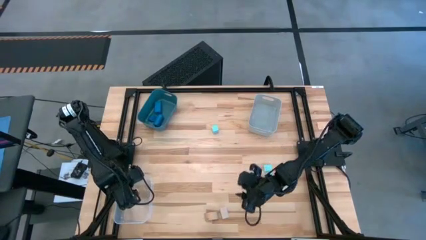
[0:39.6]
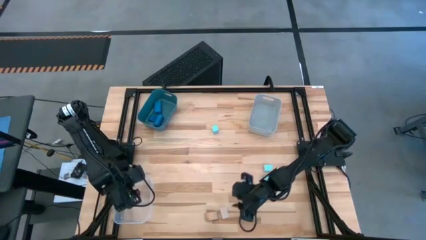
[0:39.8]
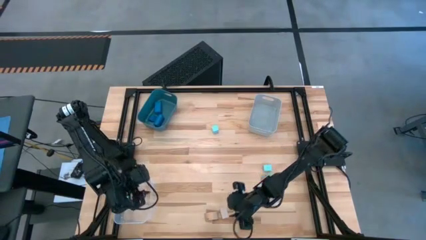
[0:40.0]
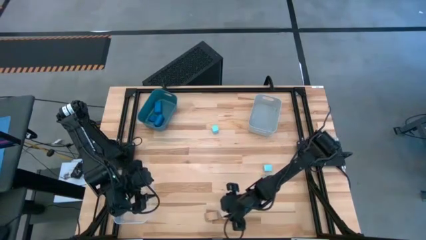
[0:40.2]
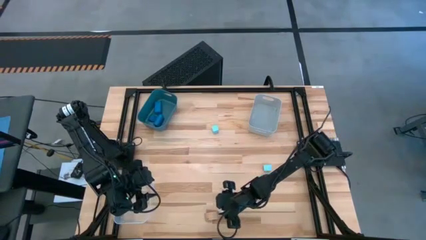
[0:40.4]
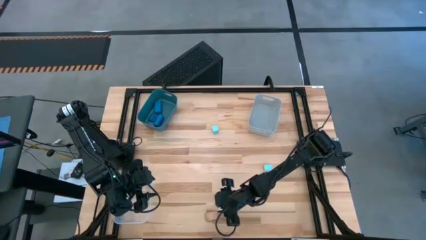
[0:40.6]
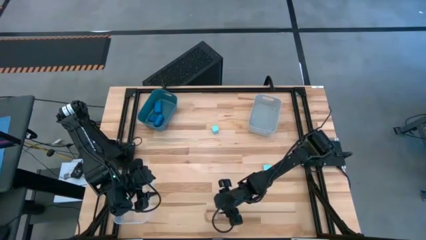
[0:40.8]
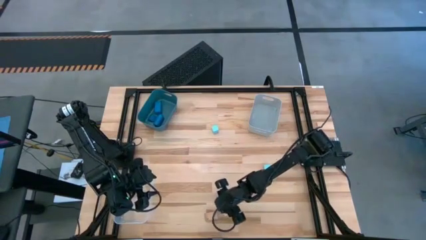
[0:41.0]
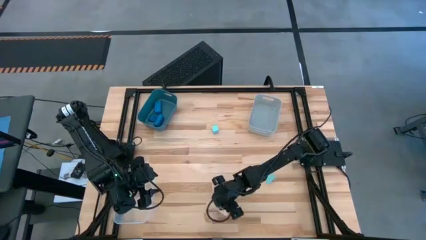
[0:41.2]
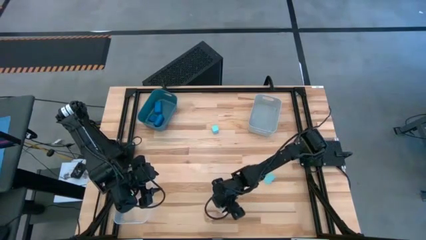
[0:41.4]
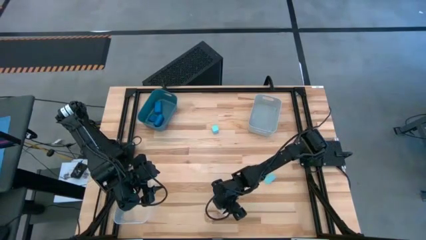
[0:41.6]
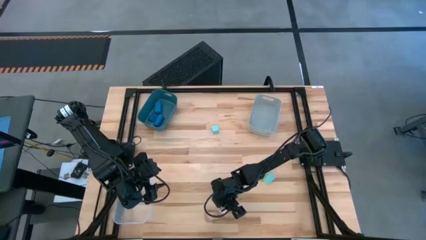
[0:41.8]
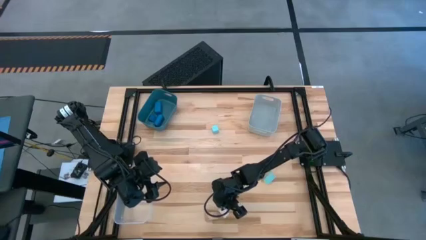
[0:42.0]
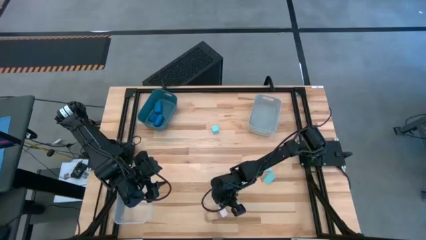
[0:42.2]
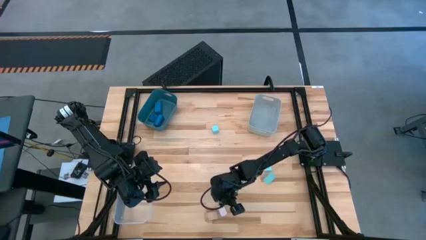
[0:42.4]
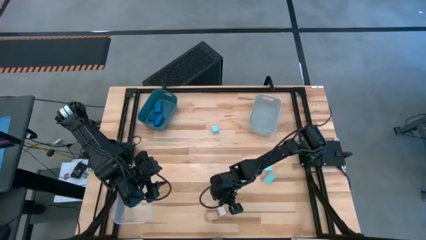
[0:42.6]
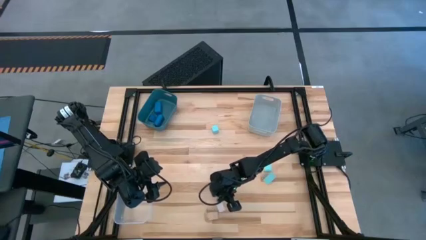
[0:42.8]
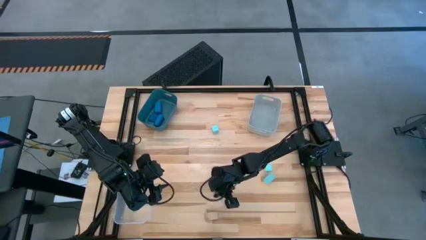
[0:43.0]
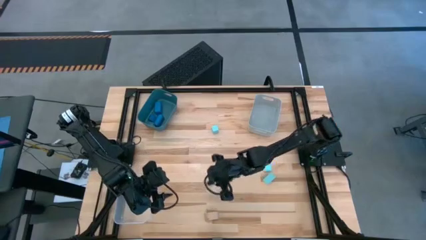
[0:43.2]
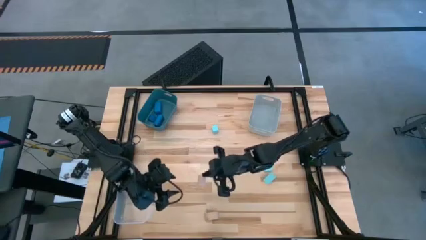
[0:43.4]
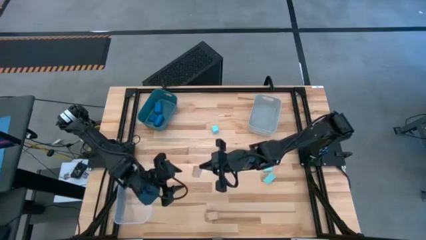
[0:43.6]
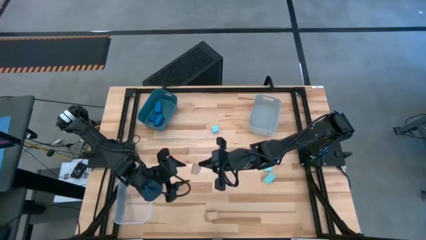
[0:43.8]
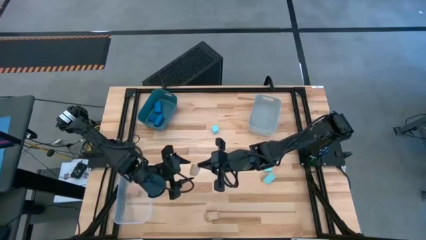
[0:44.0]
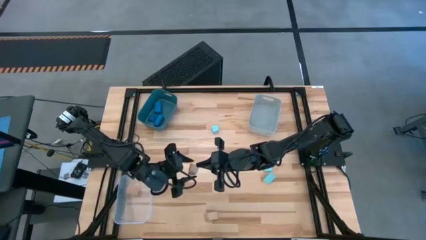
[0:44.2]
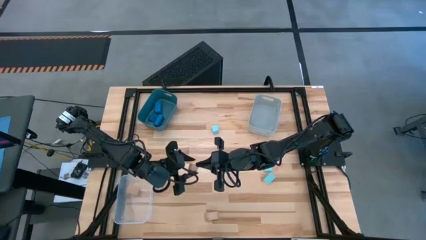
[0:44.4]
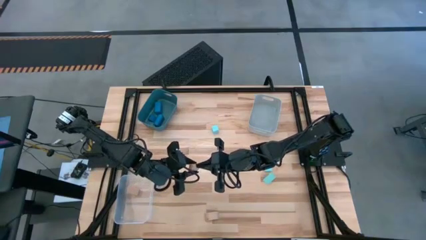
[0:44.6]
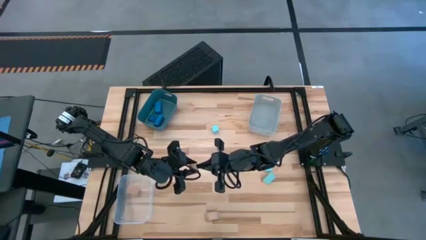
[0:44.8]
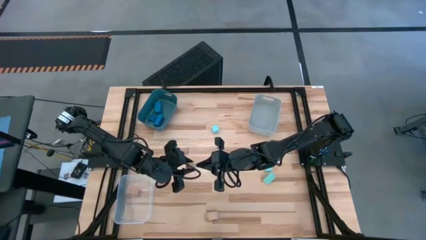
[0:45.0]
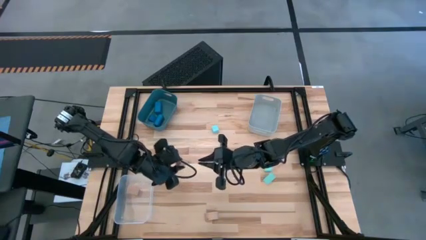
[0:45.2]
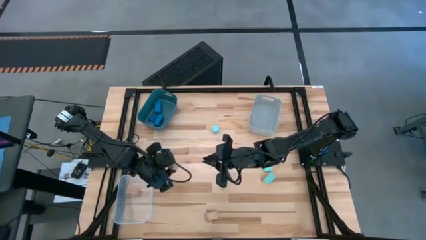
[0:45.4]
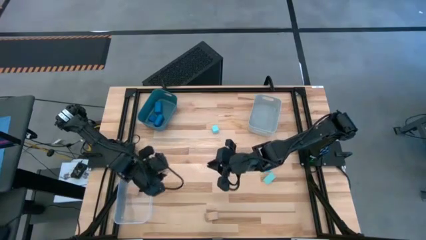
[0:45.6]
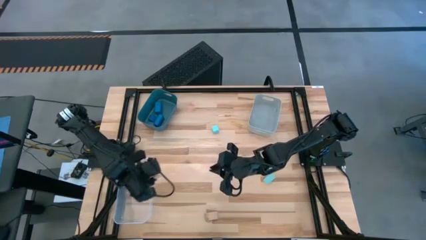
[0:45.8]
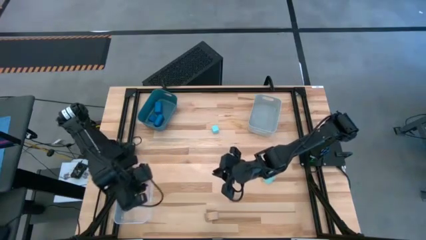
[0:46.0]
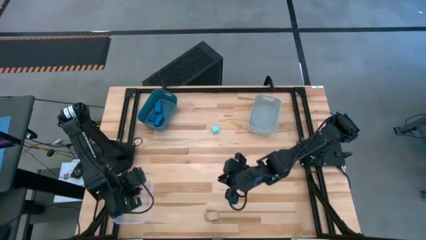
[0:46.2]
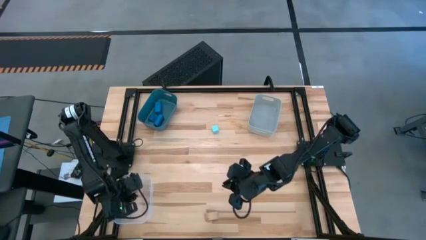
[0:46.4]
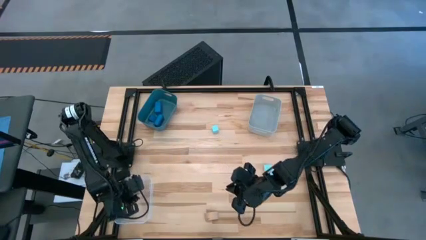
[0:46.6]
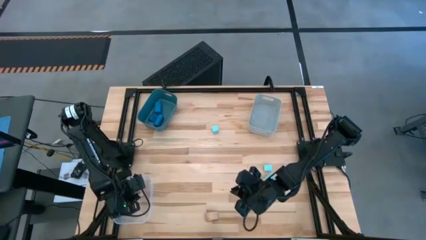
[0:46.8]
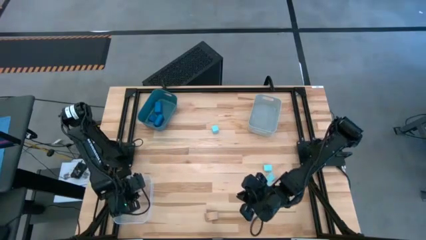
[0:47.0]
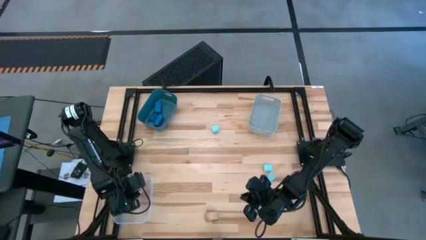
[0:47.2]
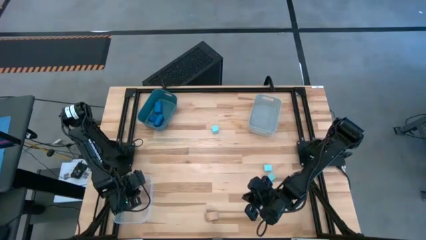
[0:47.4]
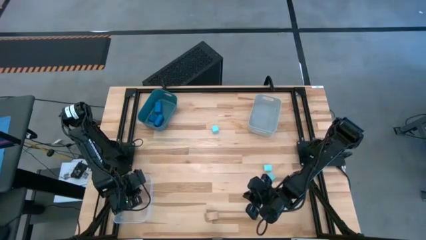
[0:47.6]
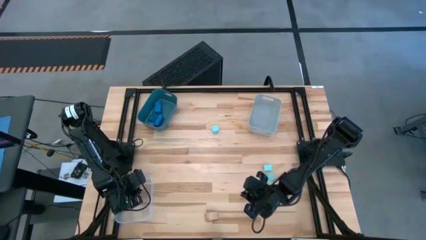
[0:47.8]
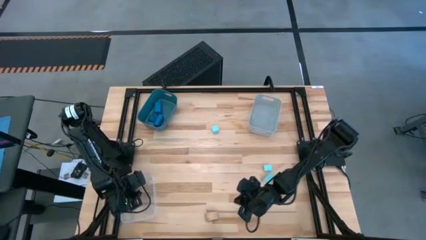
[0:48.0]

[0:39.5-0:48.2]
Task: Sort & place blocks by color
Put the right brown block into the transparent bin

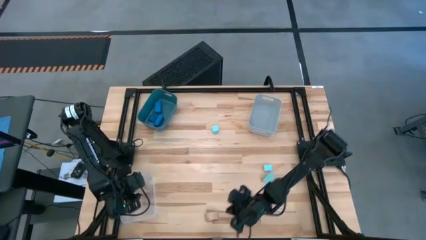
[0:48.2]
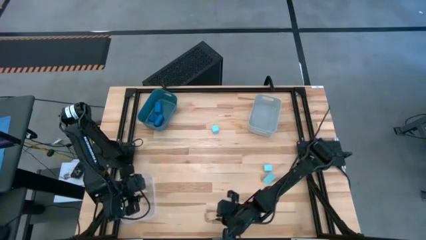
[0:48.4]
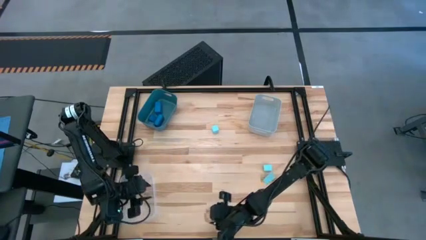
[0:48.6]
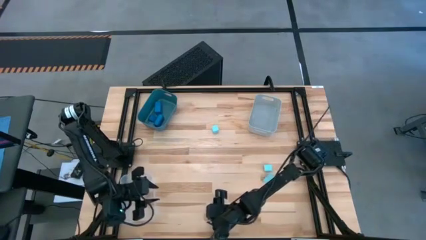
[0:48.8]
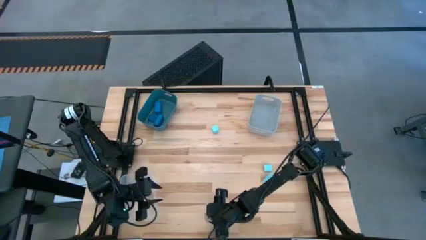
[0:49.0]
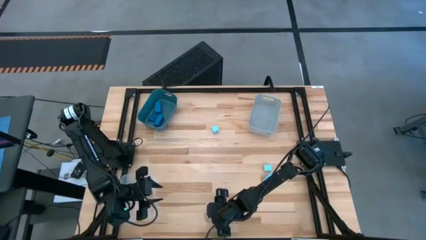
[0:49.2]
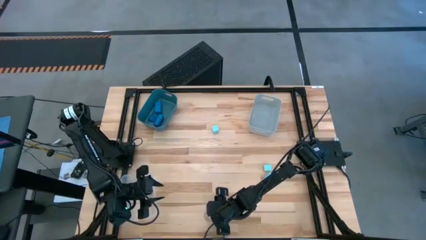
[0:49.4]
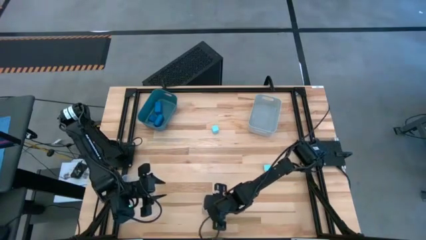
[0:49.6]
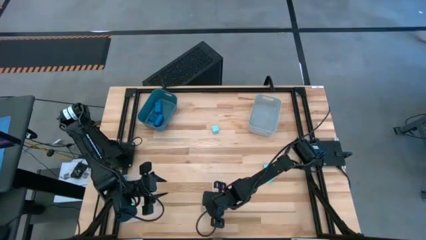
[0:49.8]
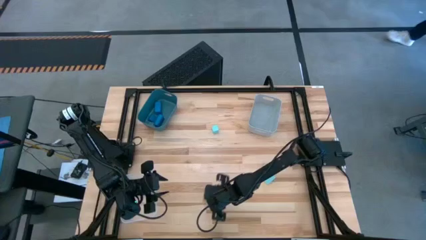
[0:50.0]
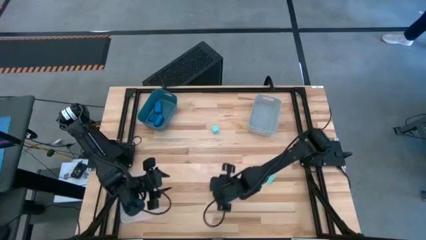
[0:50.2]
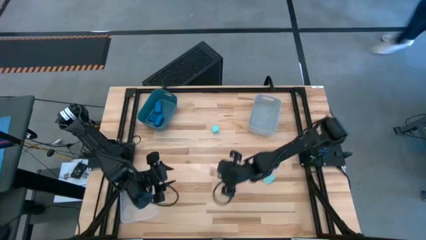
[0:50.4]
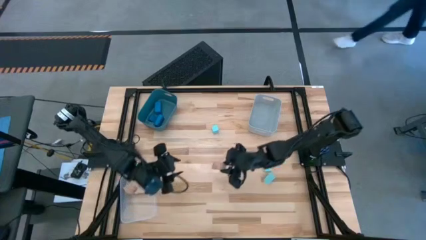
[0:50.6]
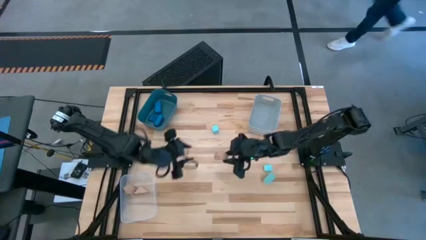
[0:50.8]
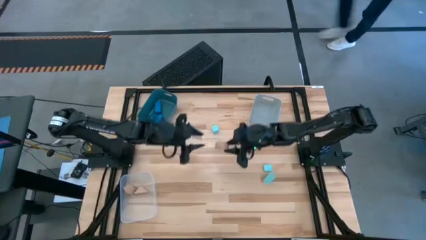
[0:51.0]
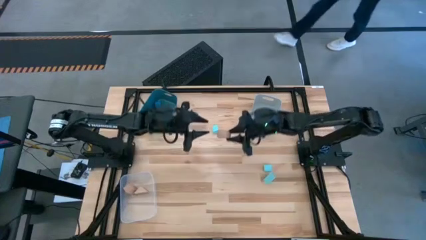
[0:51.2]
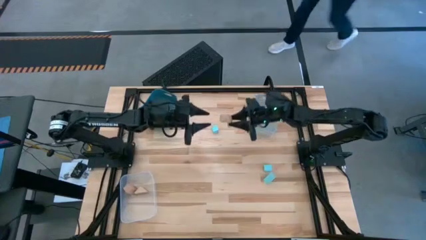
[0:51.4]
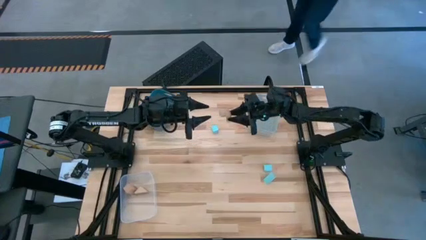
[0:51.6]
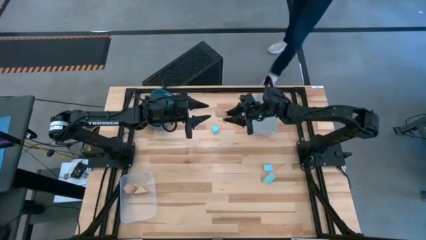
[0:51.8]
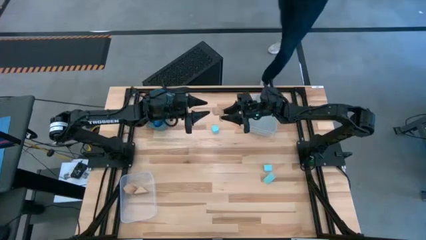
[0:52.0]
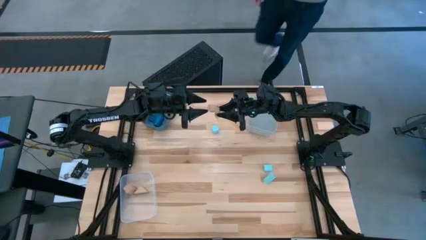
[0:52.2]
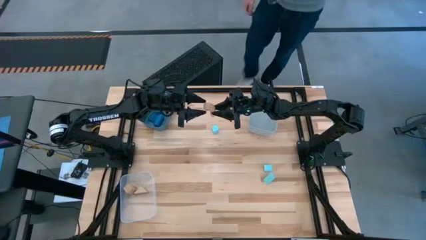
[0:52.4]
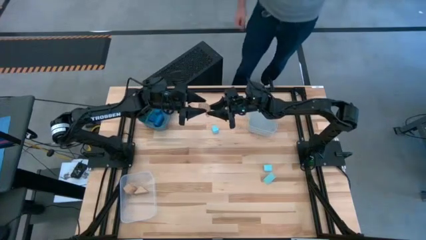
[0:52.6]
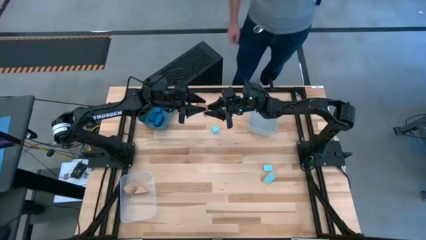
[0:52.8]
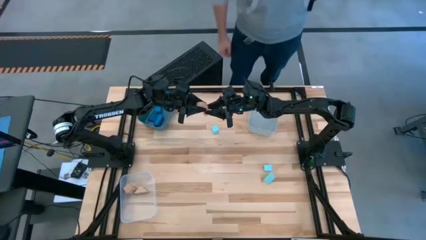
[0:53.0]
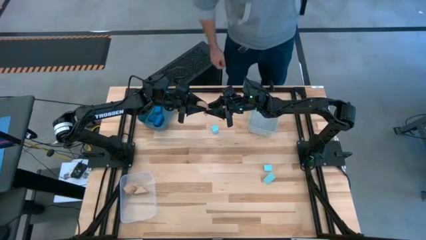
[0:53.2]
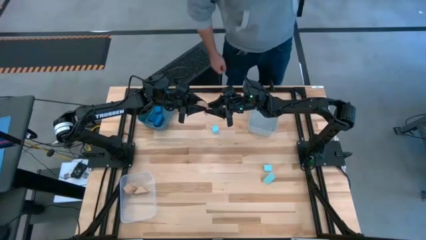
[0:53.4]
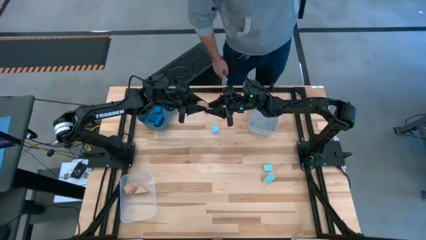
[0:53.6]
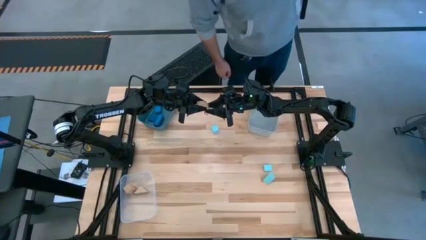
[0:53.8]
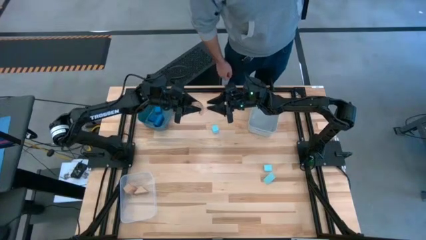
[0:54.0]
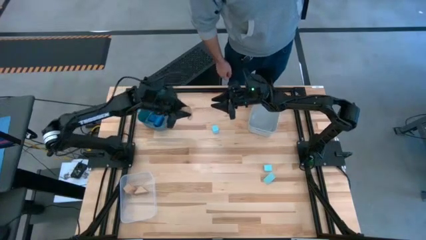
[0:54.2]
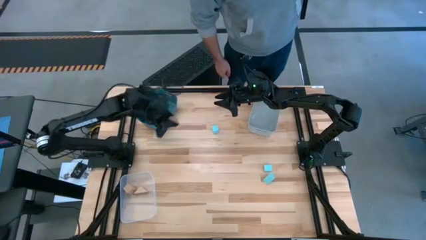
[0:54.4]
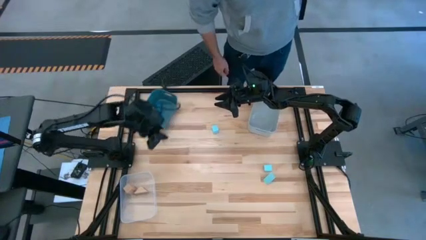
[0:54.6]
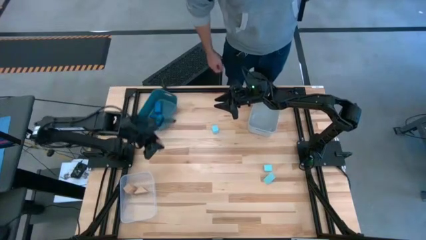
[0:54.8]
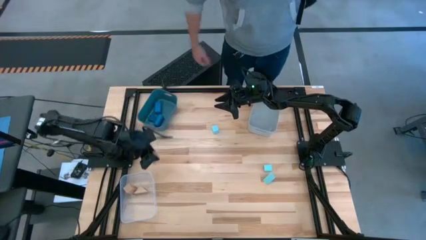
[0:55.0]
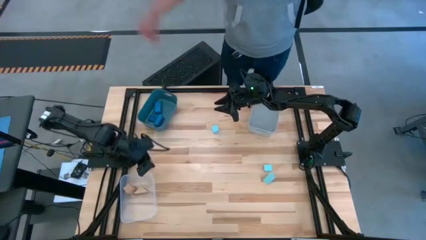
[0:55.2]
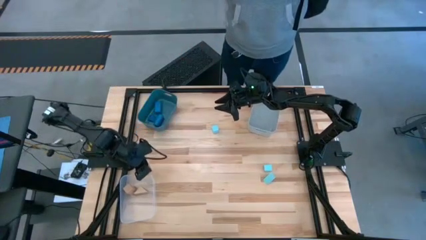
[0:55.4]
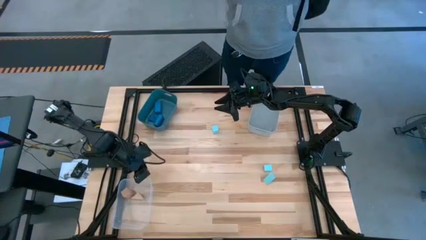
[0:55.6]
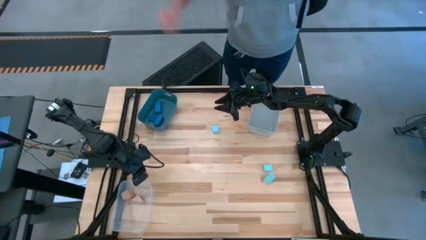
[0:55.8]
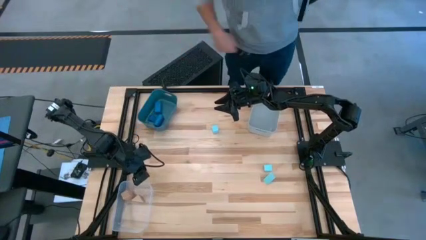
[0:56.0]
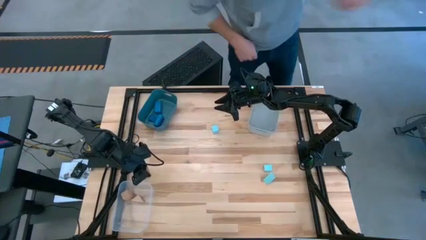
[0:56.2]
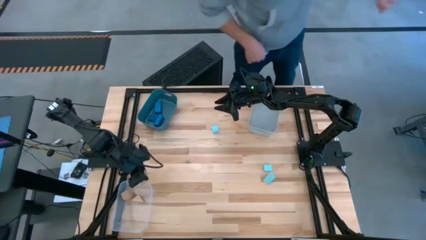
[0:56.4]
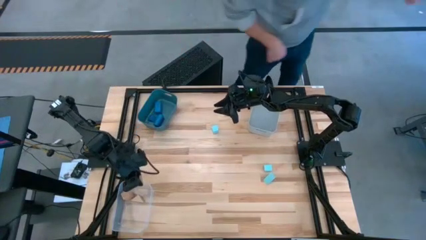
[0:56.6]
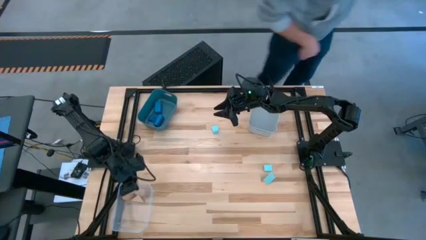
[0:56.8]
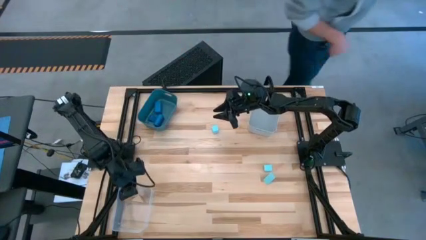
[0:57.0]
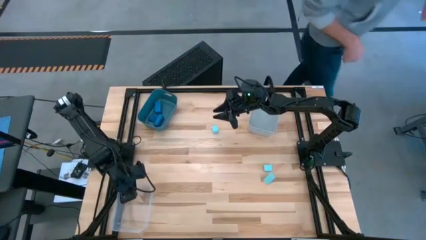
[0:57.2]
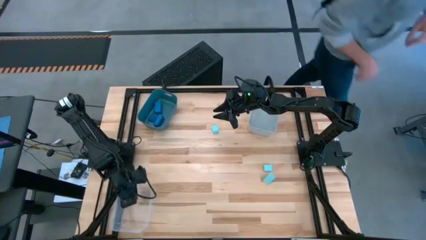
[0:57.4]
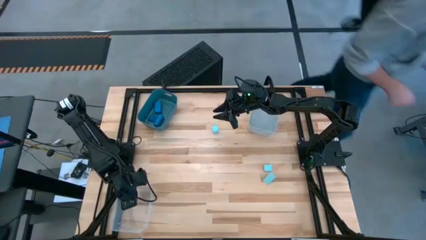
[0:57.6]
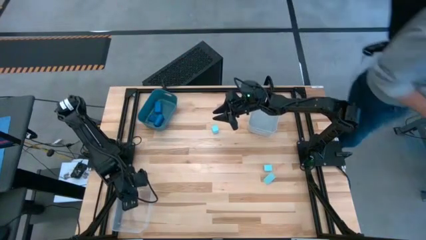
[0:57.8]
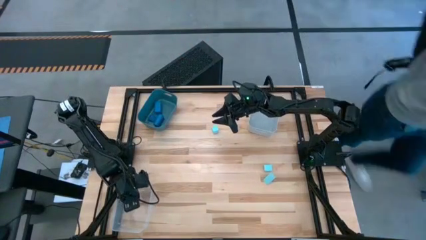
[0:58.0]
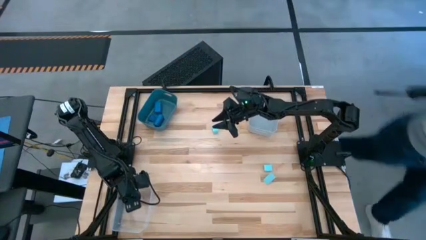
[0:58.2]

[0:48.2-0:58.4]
Put the brown block into the transparent bin
